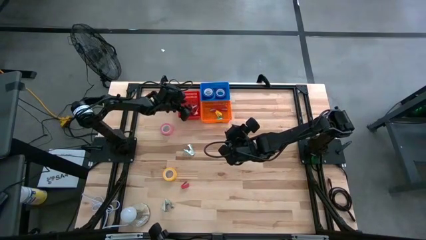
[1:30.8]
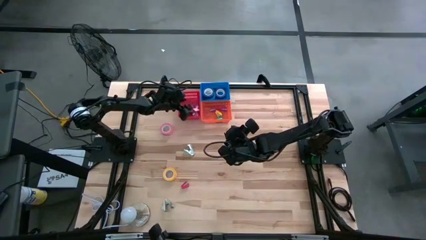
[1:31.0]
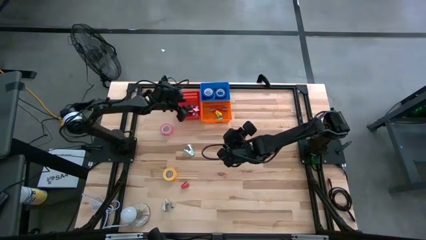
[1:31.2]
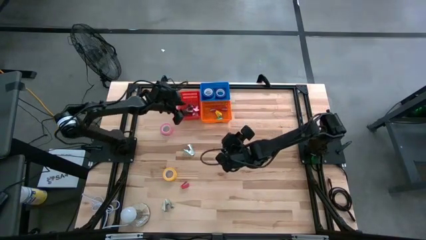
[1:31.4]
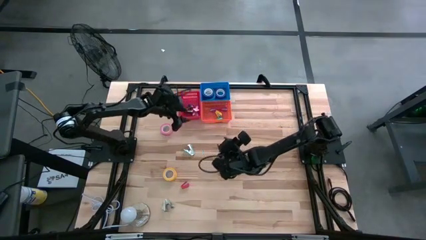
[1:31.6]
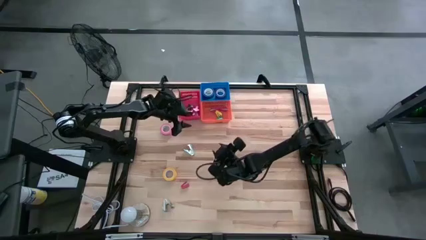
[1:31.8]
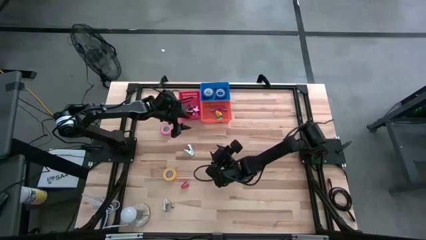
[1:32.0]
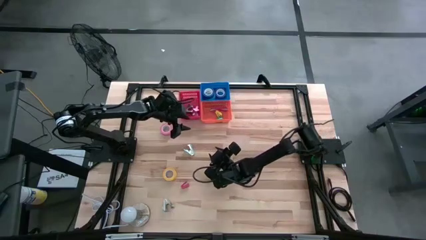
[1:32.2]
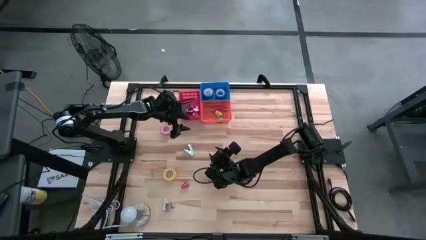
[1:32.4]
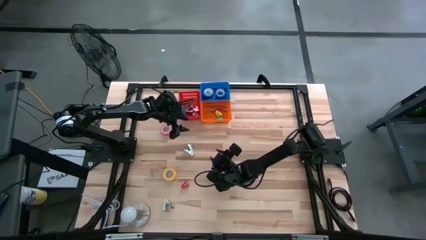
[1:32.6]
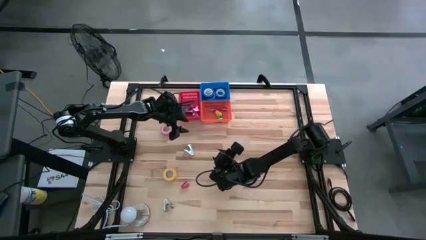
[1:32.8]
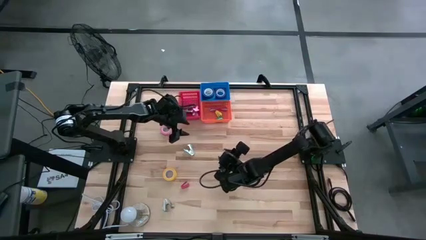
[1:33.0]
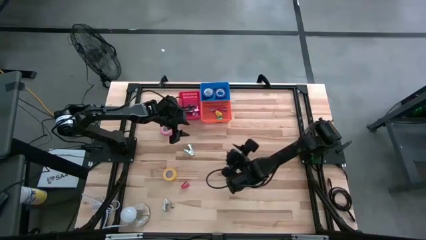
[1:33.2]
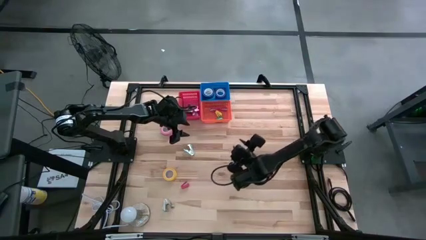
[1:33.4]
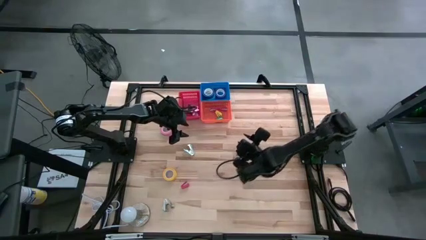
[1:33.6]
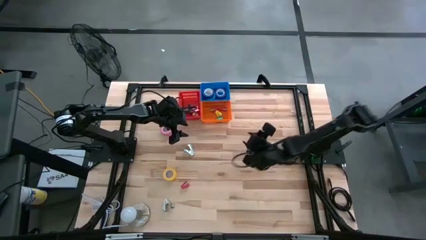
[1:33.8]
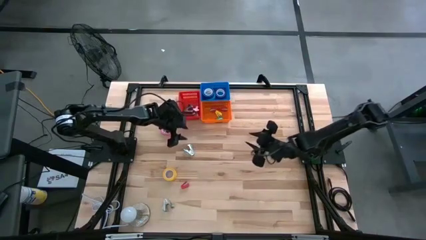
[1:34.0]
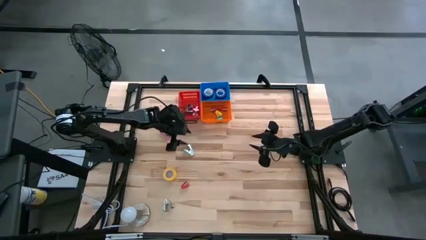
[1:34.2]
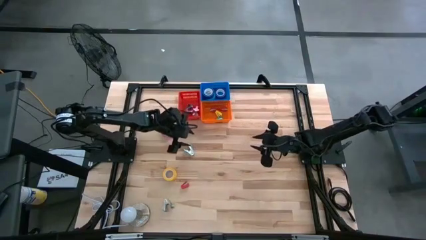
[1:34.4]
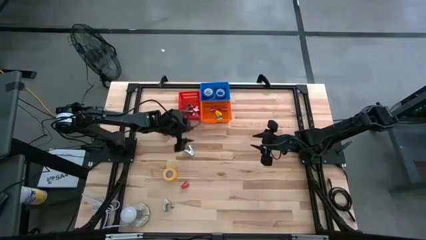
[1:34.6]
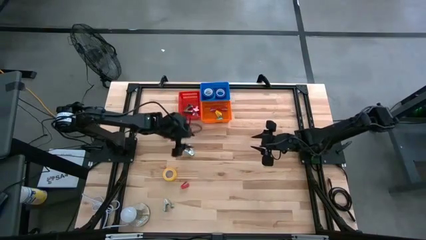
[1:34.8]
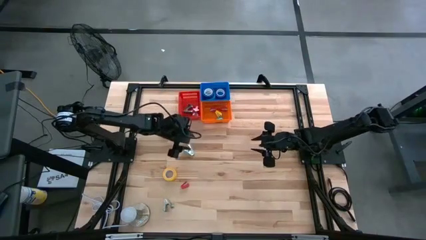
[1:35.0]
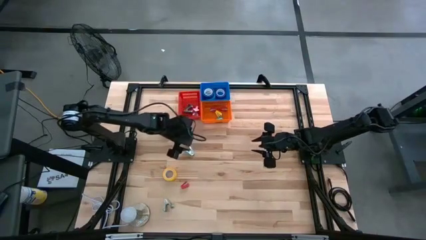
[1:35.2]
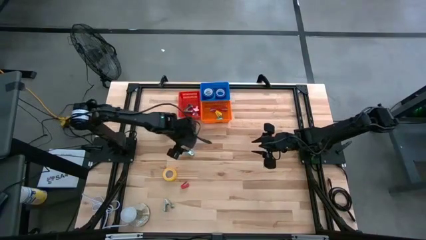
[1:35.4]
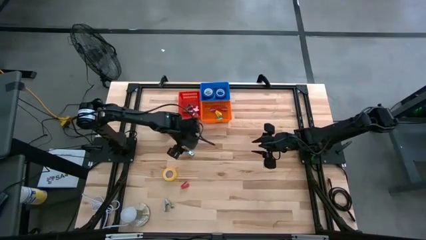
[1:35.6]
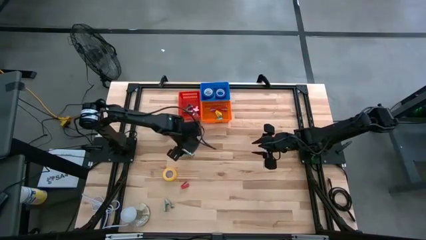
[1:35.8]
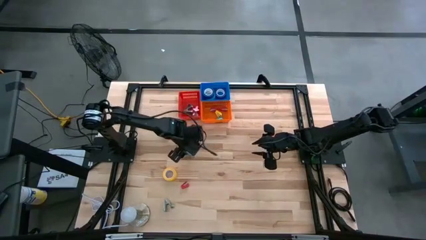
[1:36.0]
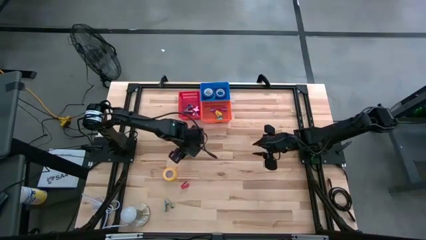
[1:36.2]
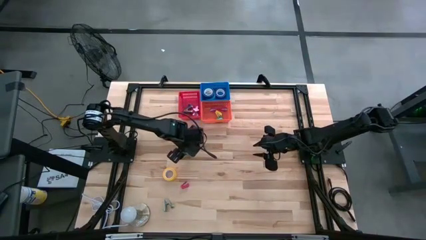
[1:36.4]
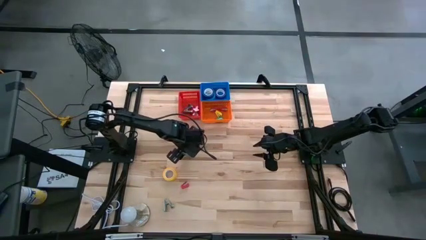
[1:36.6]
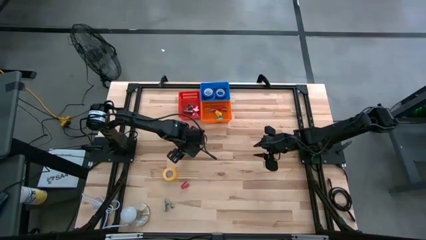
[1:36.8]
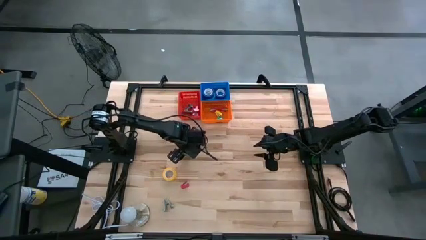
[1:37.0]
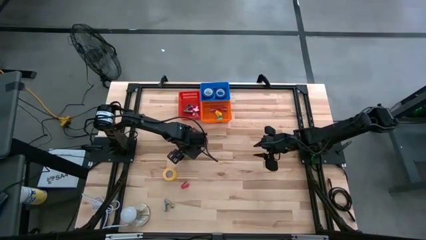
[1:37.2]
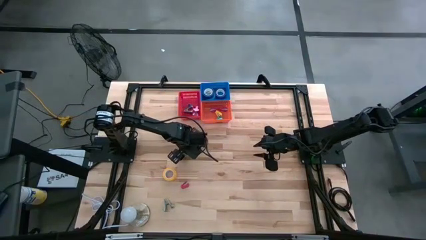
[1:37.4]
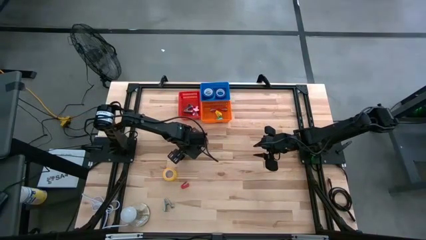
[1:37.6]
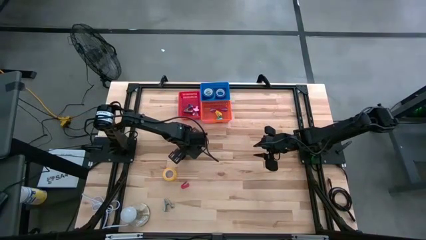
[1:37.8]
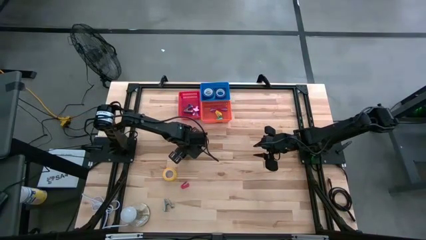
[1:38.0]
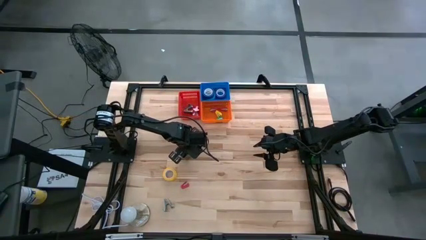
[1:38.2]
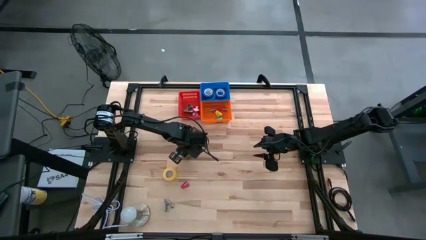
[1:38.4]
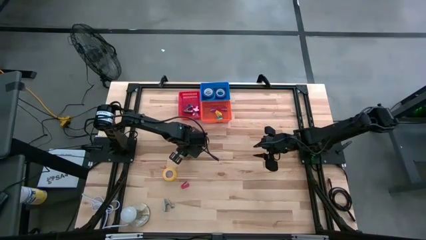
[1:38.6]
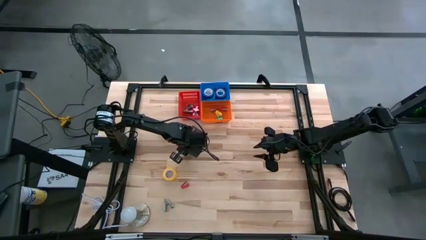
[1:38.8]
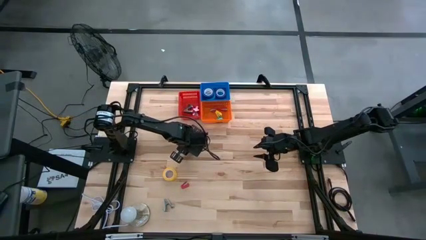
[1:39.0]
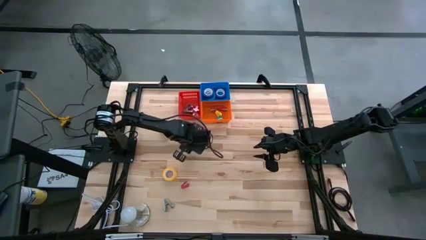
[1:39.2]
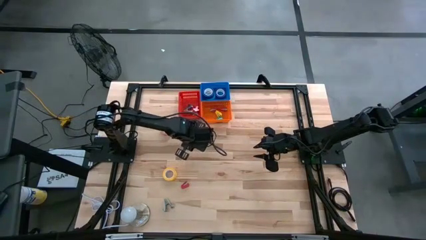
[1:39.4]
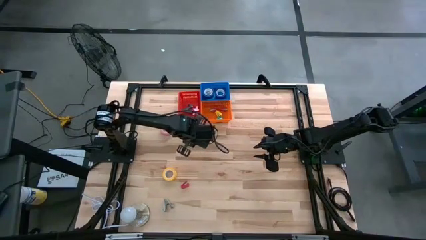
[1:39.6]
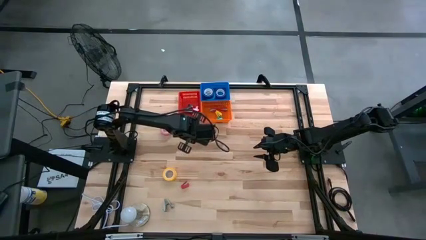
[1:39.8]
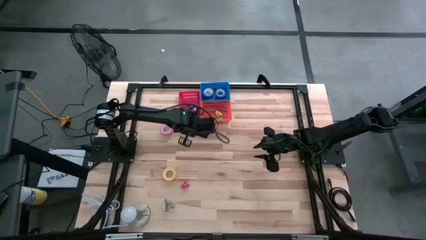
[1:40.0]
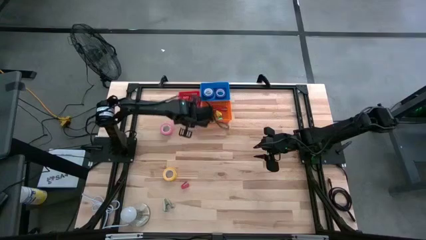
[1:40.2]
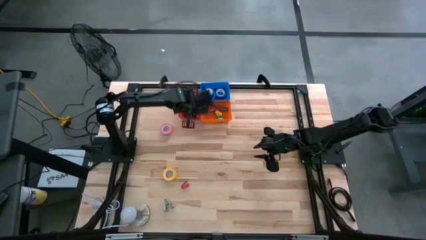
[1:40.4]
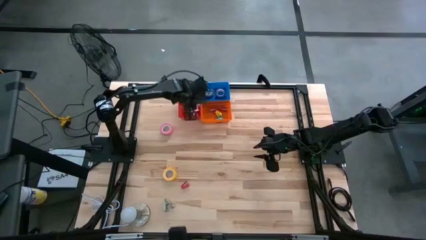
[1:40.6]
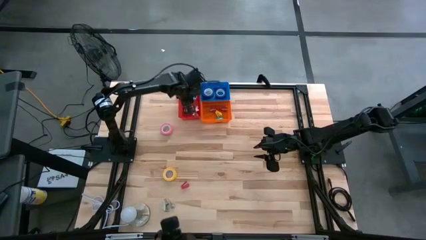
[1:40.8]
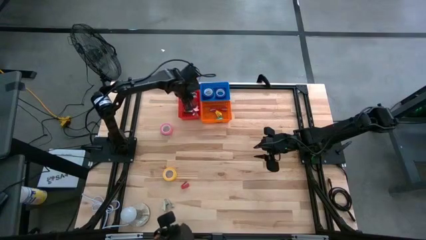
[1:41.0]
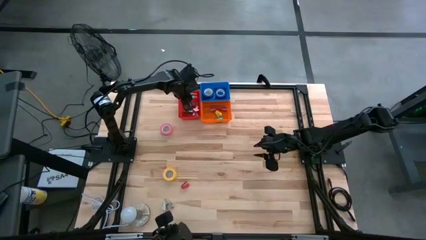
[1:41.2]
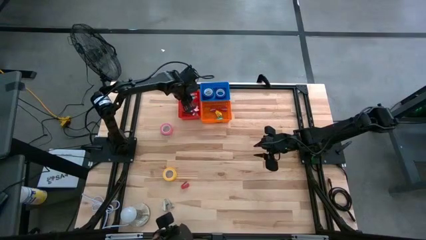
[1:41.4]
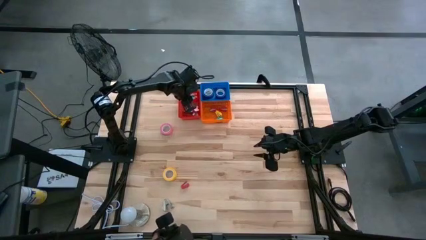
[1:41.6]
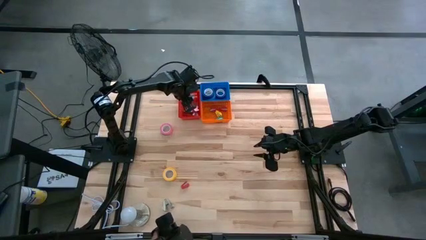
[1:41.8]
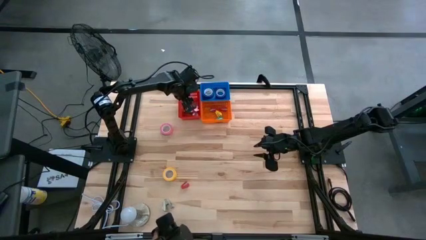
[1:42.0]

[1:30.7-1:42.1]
Task: Pick and place Stapler, Stapler remover, tape
Put the light blue staple remover into the red bin

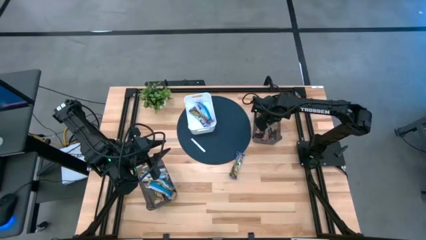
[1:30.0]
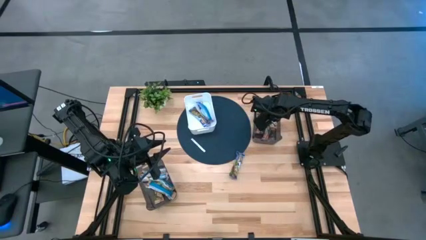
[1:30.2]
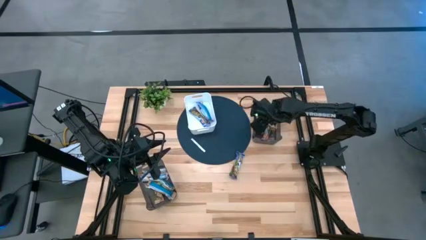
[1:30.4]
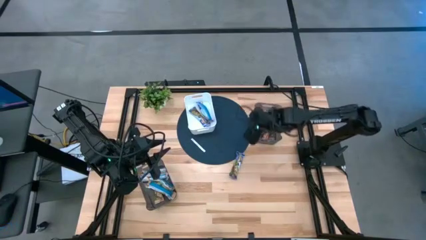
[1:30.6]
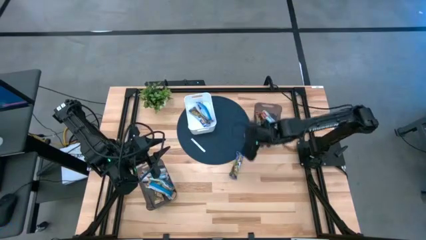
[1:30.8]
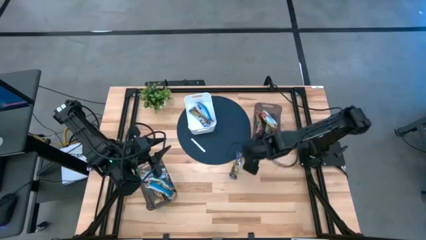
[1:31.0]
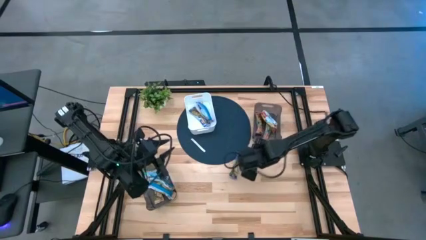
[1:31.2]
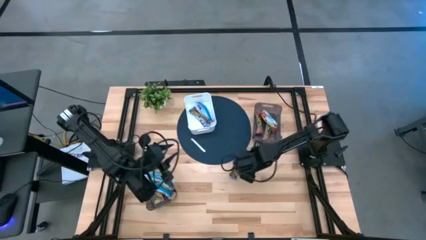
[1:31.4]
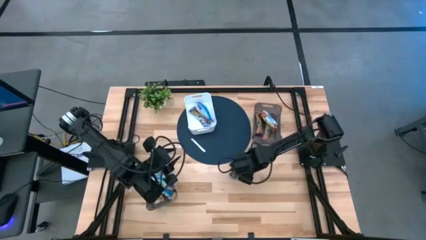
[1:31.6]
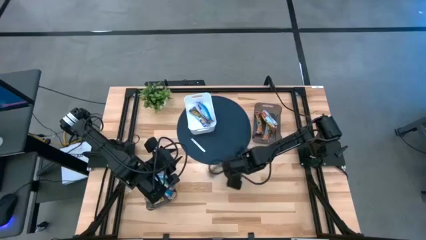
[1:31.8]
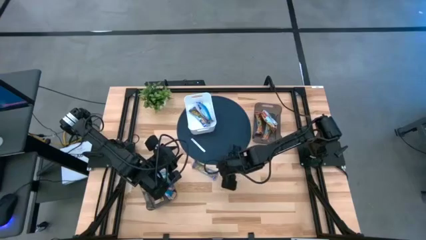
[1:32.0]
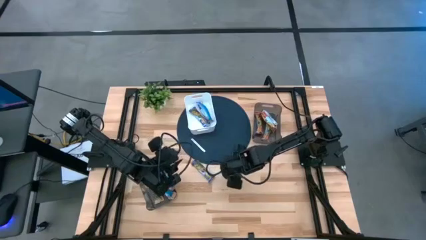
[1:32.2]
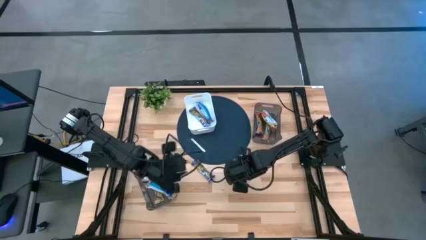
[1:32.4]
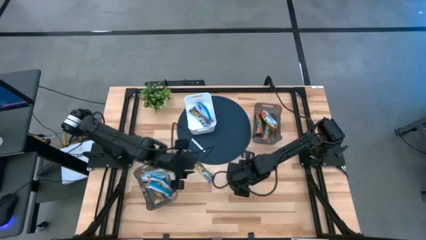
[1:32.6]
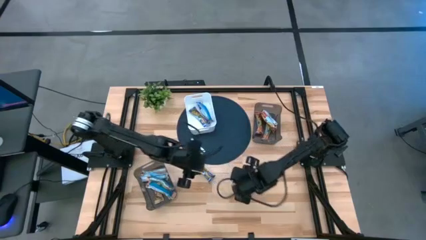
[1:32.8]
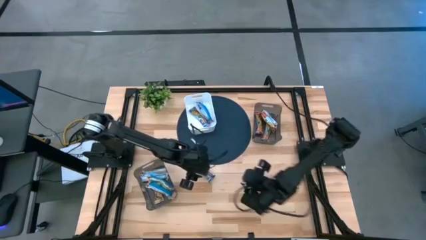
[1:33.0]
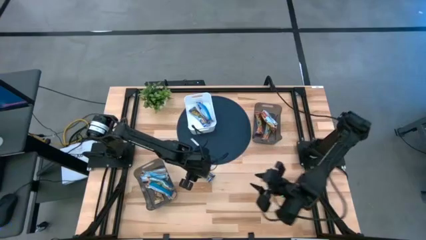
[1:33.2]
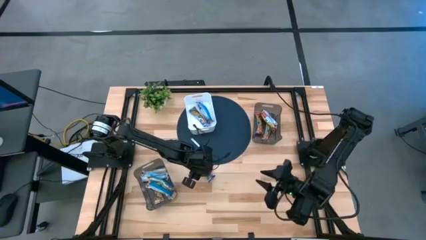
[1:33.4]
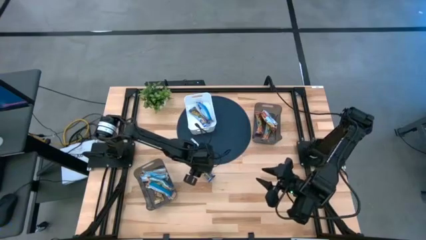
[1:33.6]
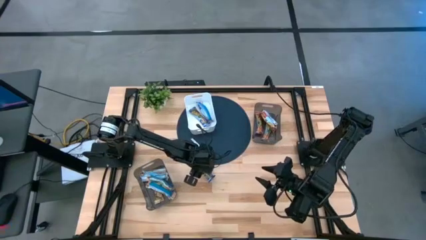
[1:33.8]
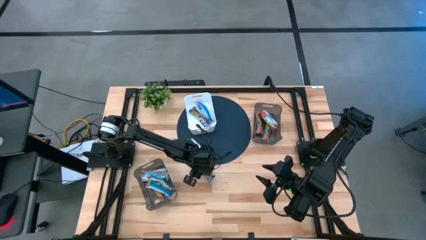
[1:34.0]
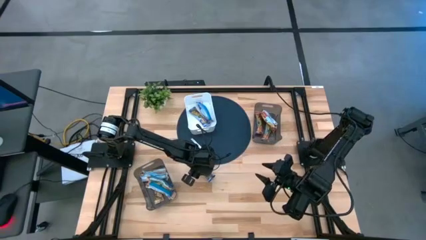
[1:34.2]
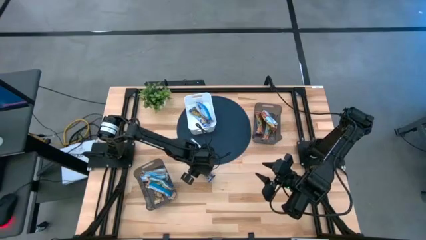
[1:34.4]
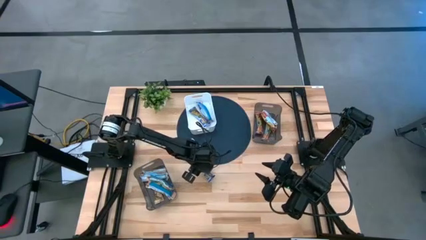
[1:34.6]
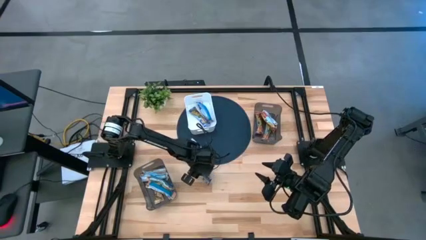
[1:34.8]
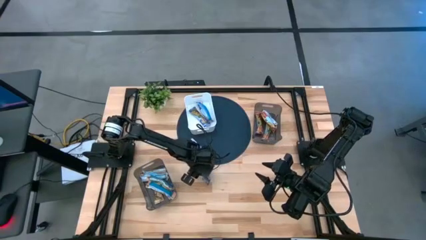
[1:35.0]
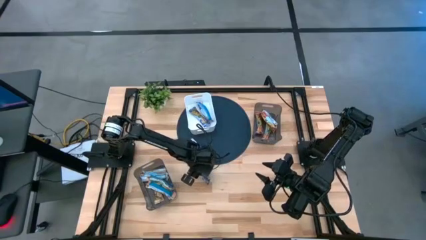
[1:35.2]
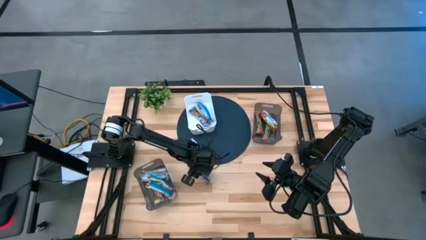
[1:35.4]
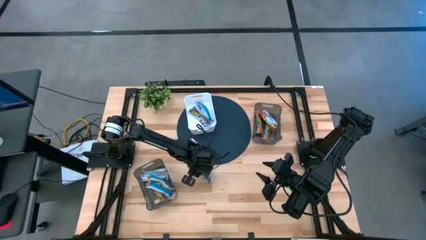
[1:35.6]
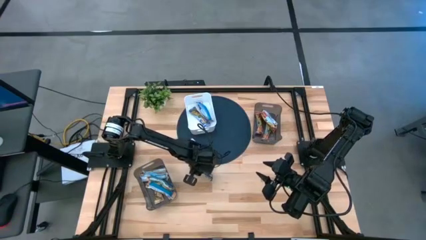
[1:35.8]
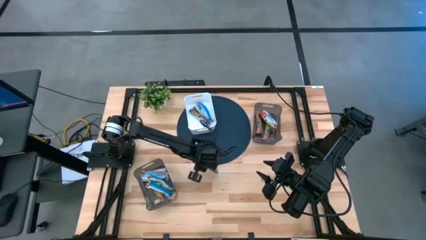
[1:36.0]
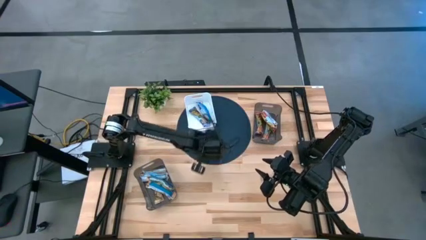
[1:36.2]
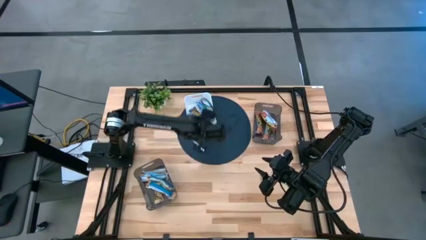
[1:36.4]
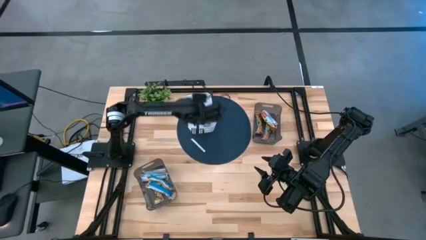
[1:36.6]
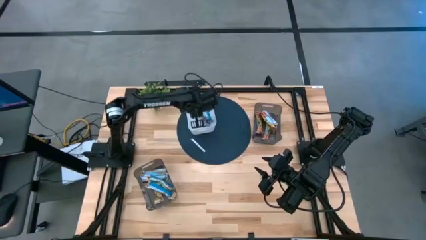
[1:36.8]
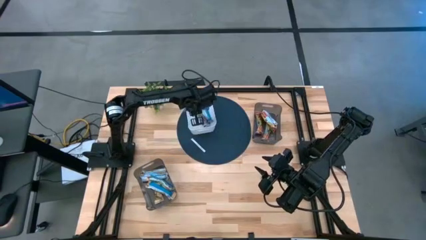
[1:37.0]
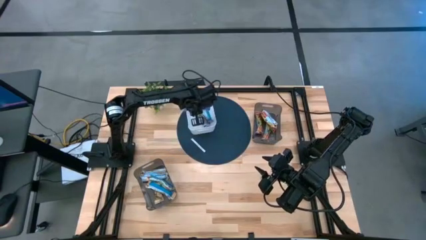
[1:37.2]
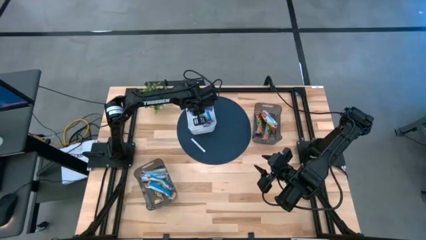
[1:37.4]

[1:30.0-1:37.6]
Task: Pick and place Granola Bars by type
Put the blue granola bar into the white bin
